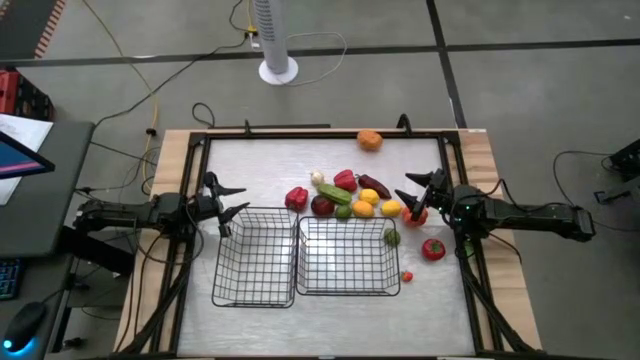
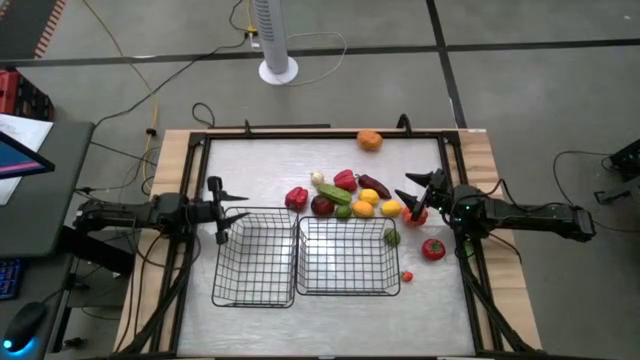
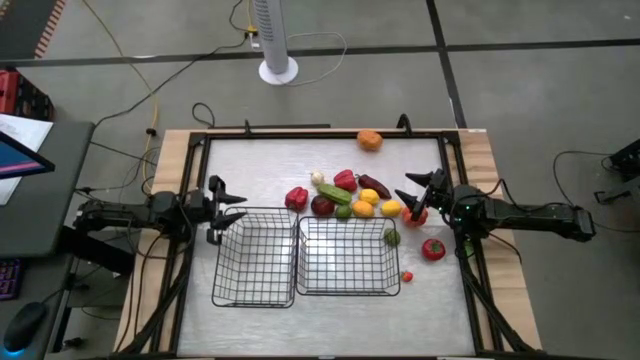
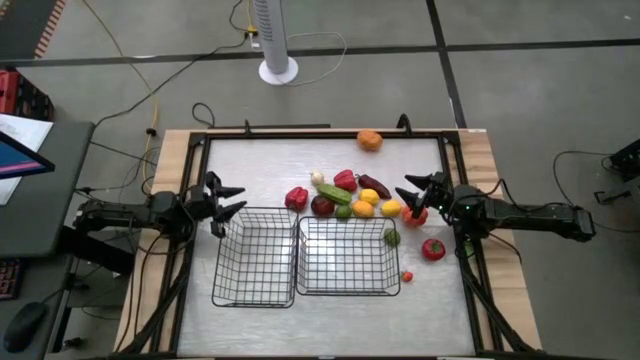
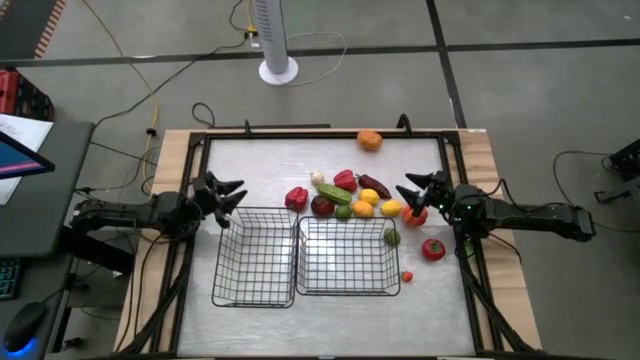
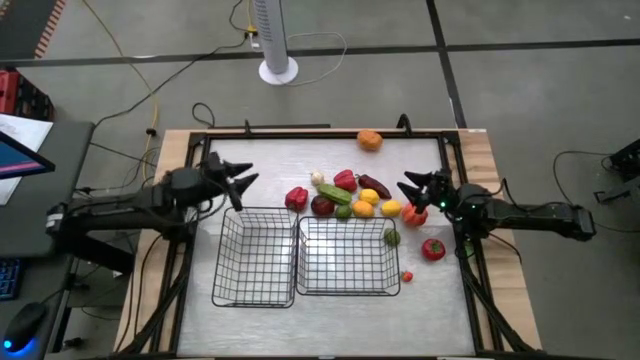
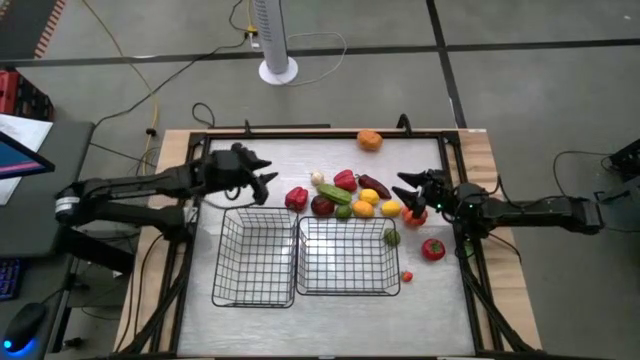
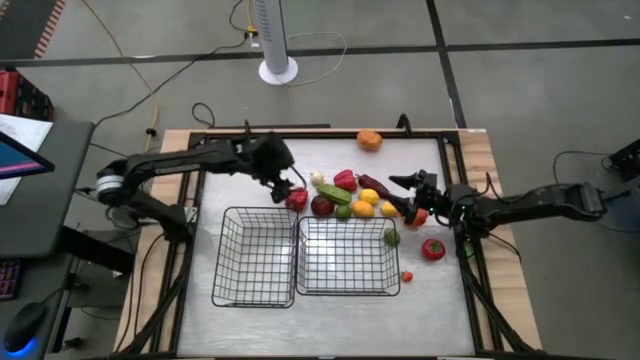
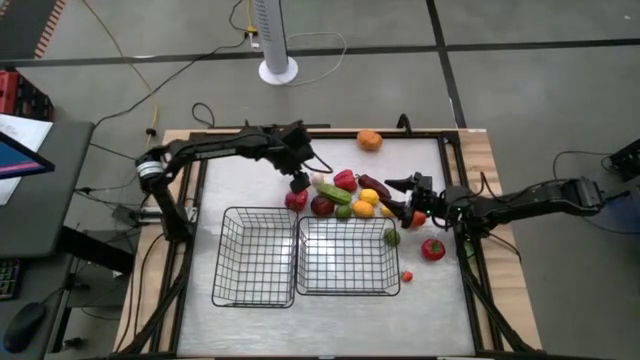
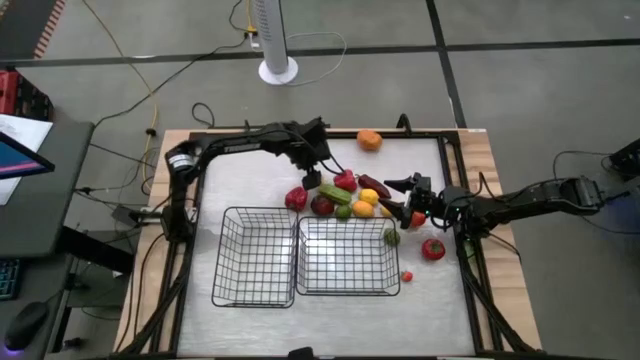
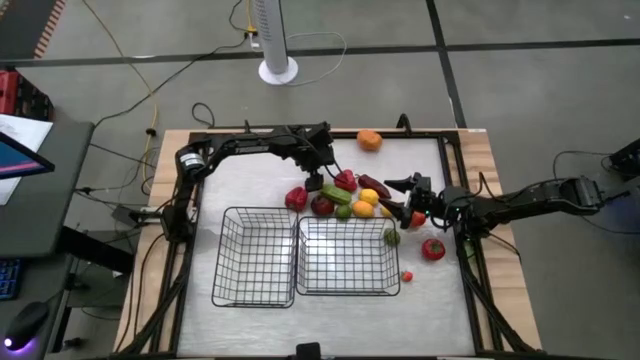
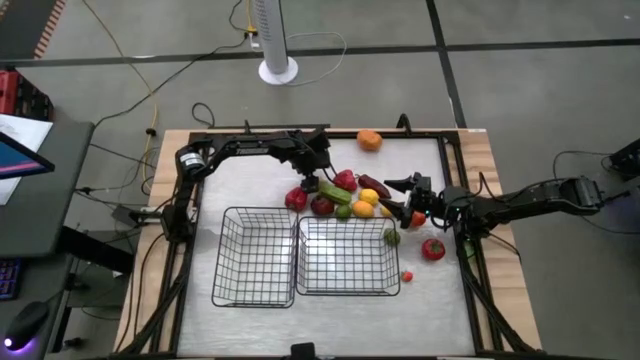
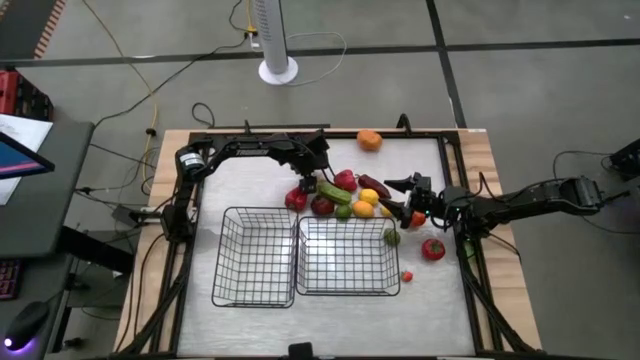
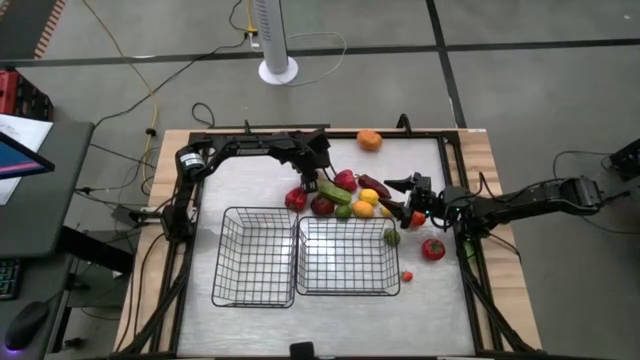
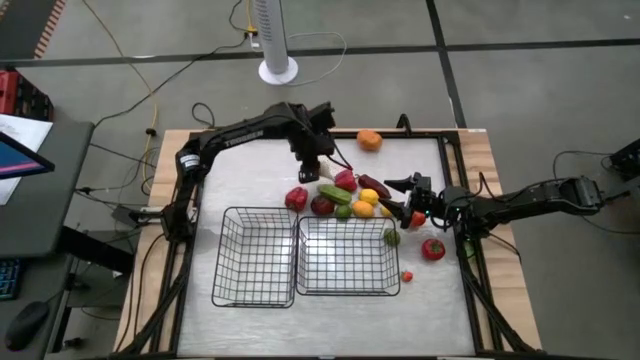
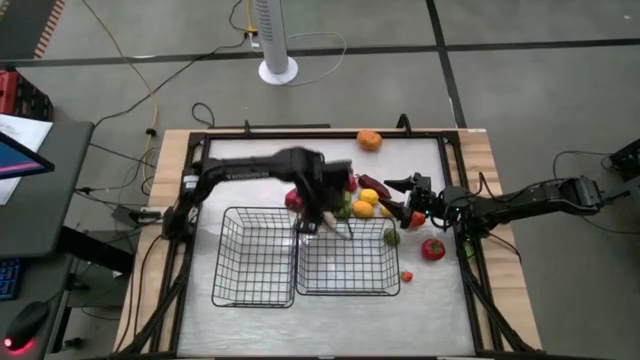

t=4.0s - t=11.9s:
Task: Sort produce into baskets
Put the garlic into the right wire basket

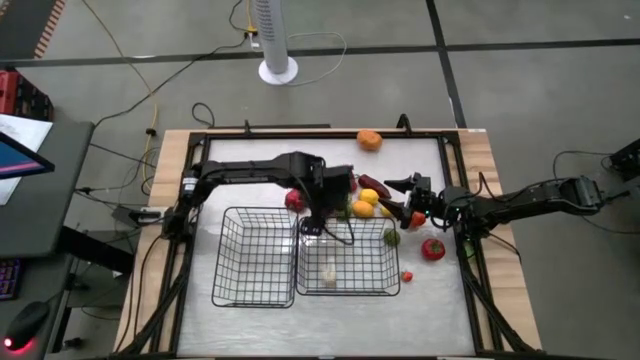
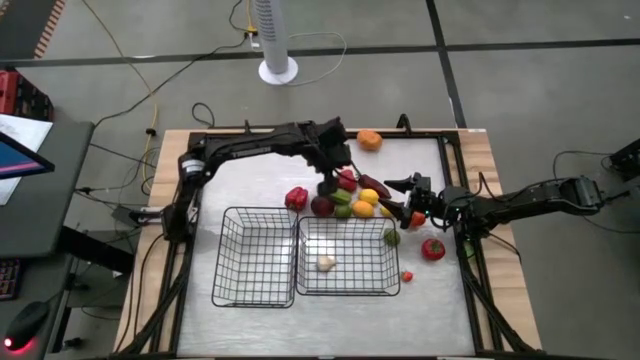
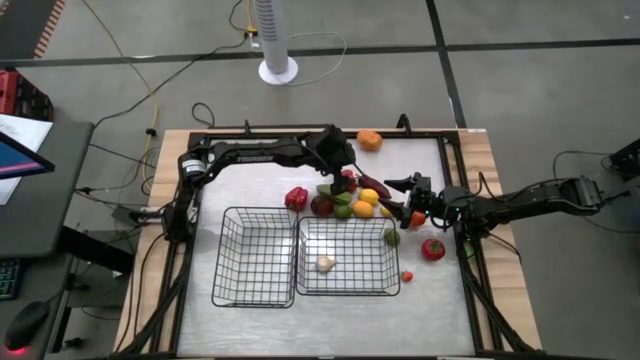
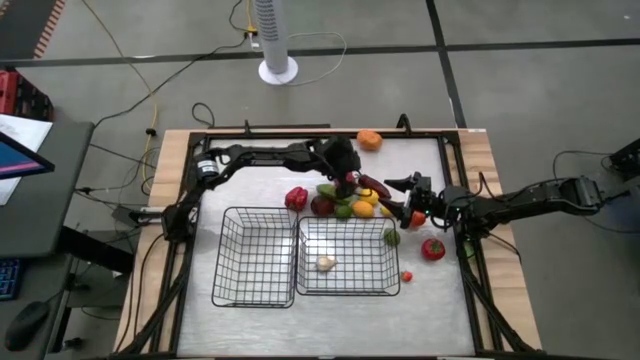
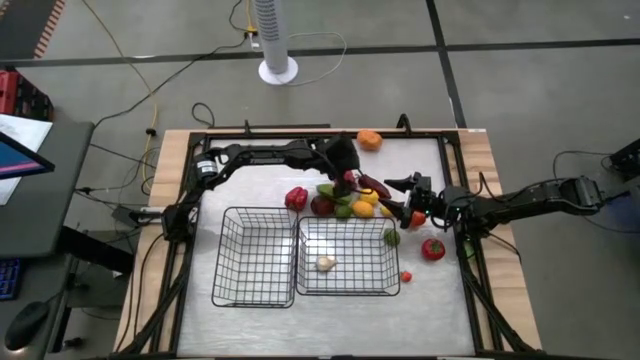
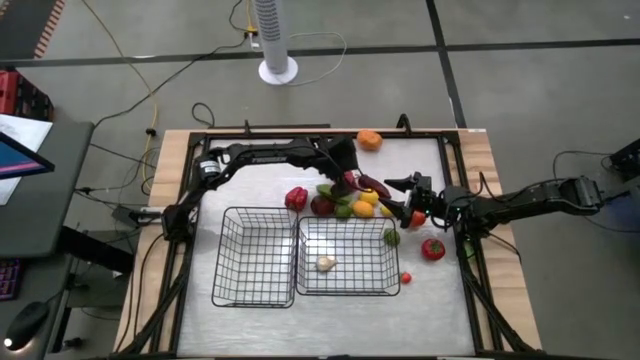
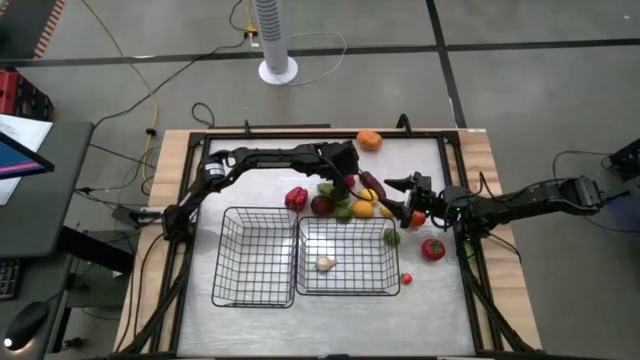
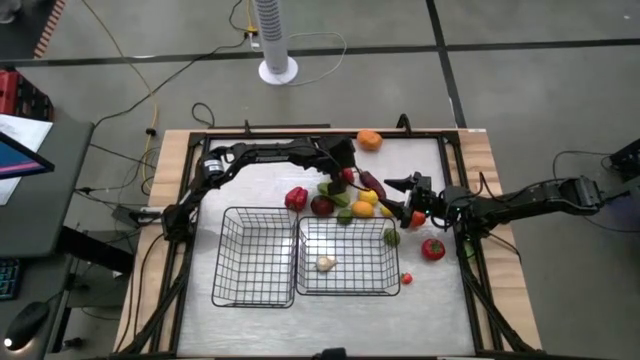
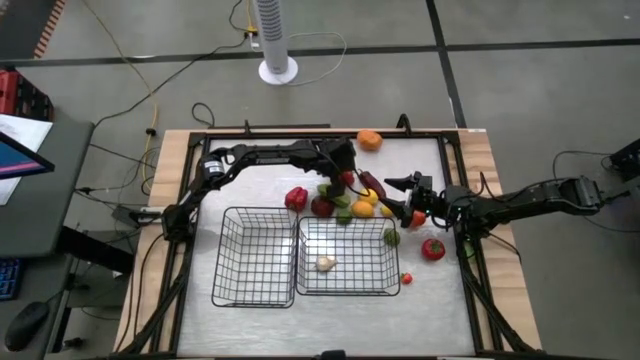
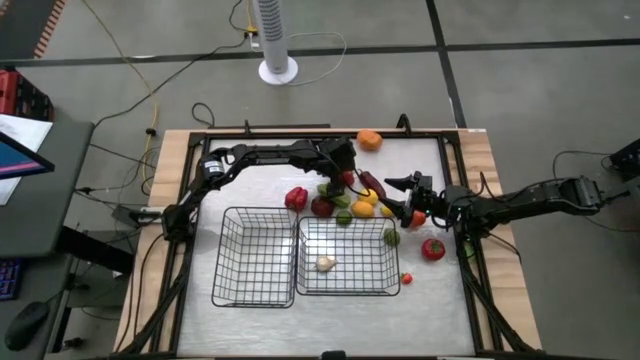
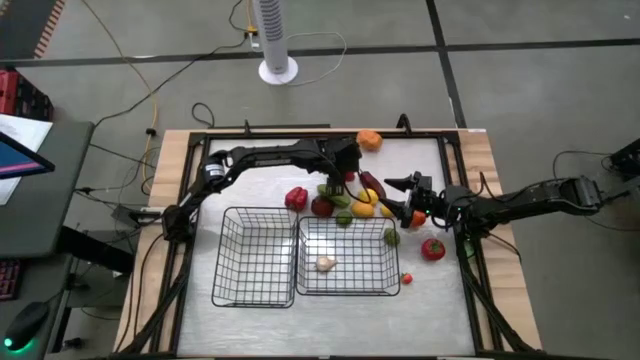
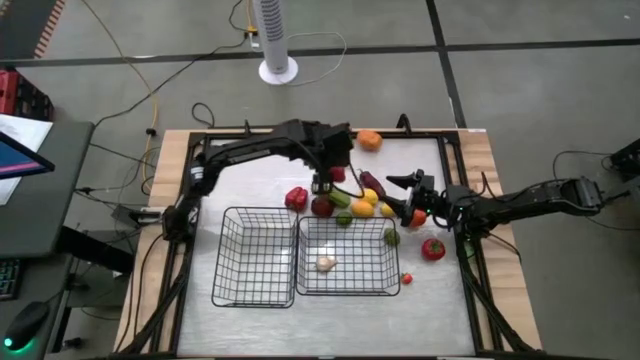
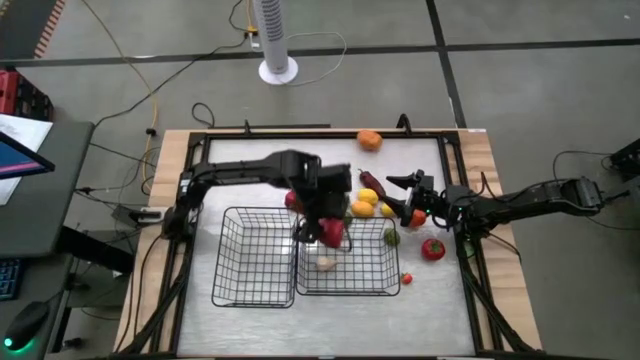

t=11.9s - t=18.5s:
Put the top red bell pepper into the right wire basket

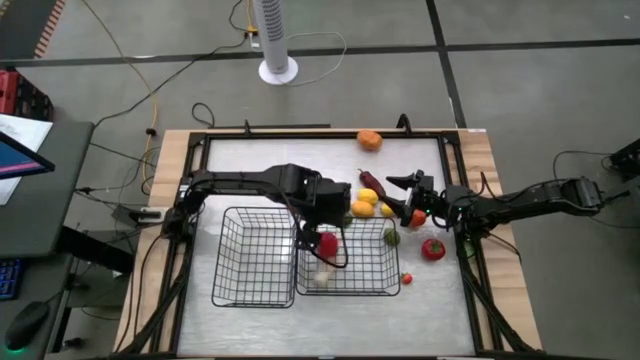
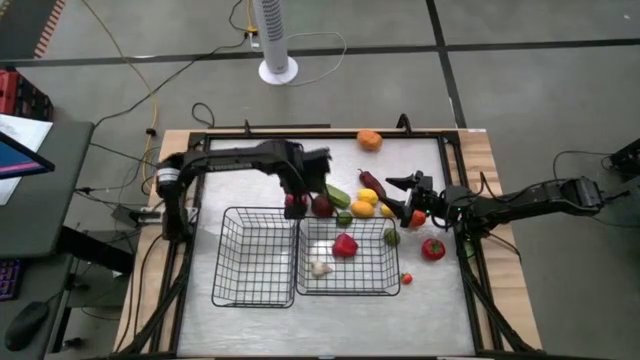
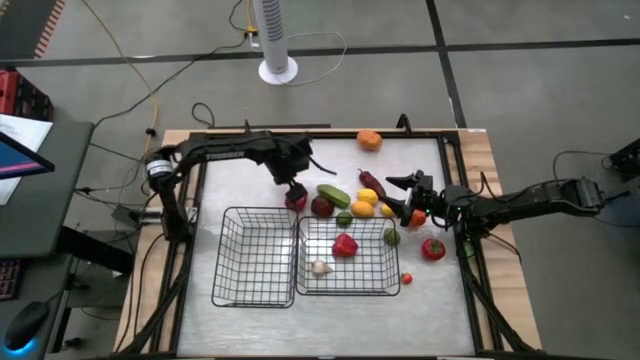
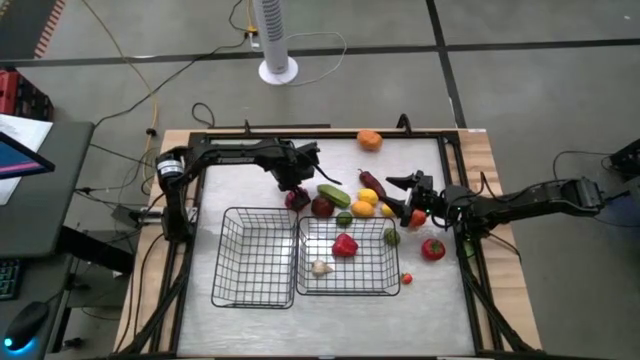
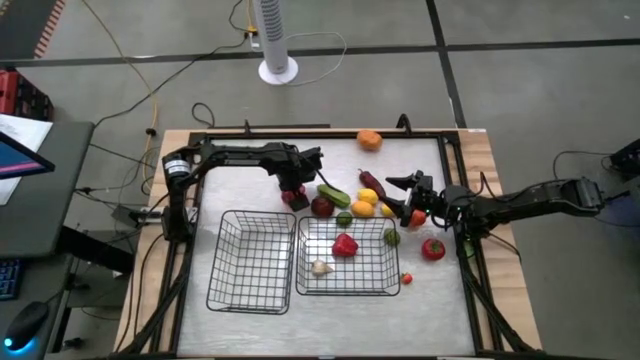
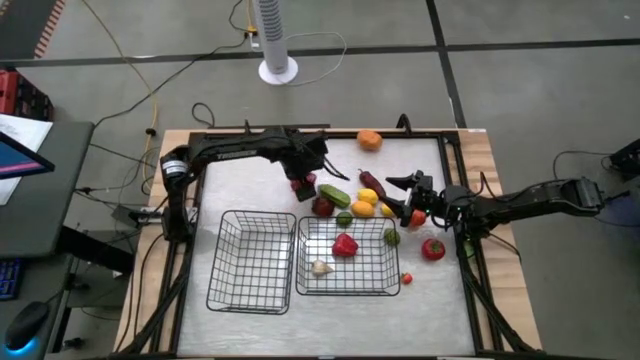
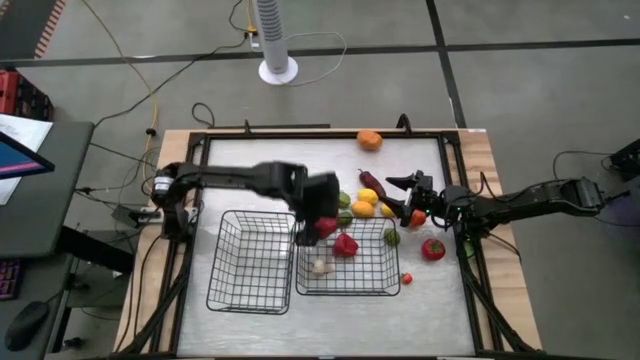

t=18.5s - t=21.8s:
Put the red bell pepper into the right wire basket

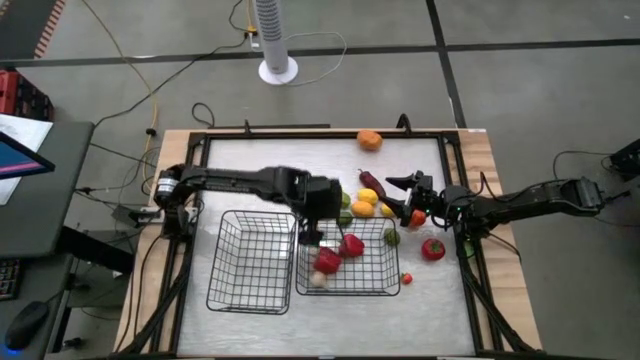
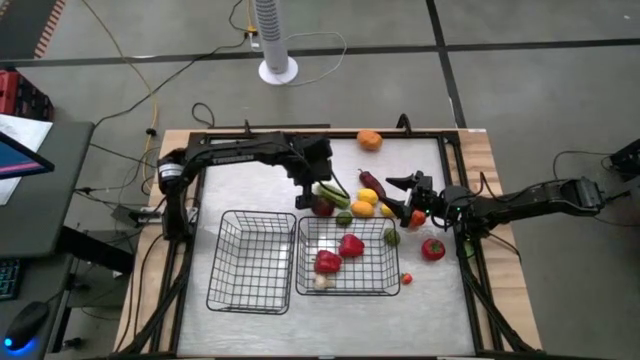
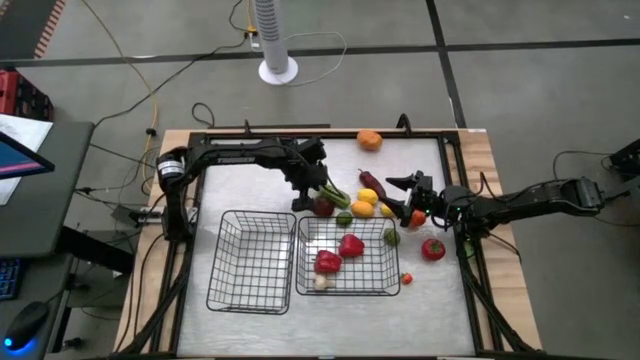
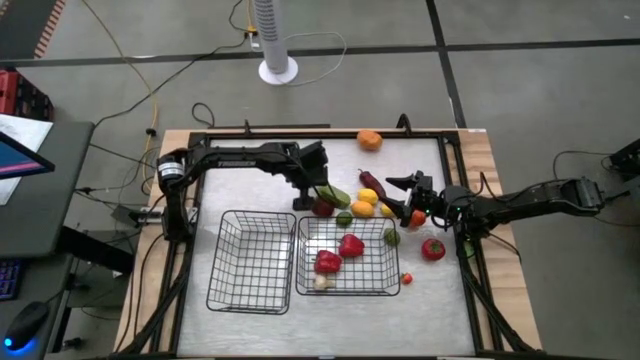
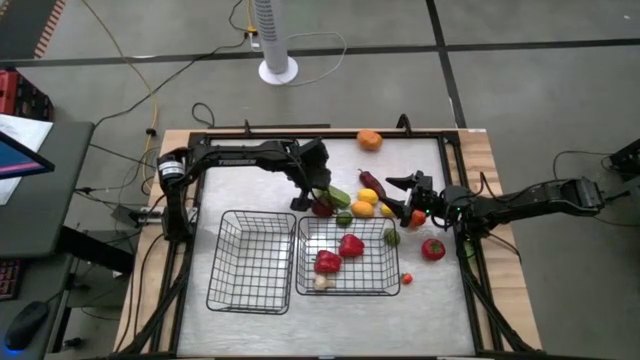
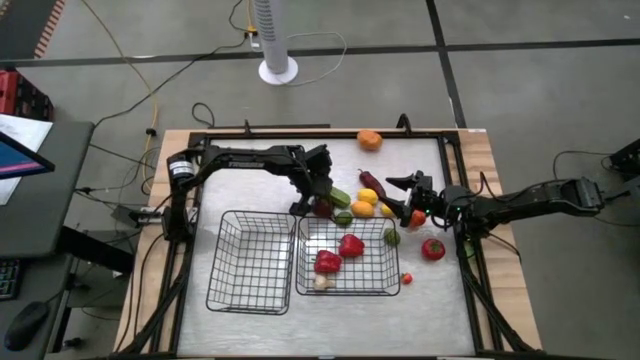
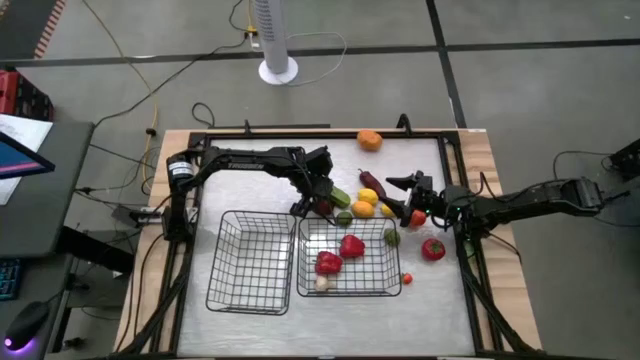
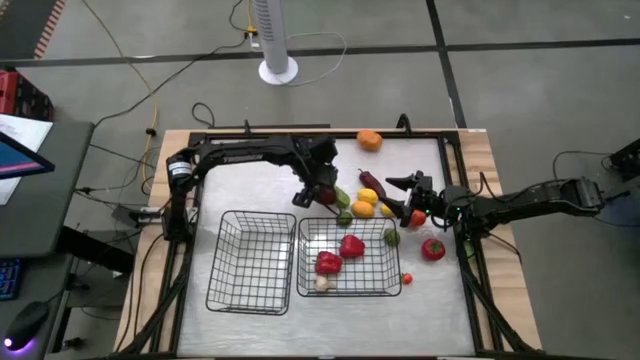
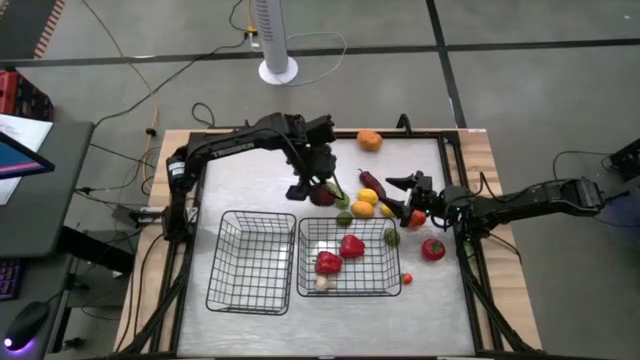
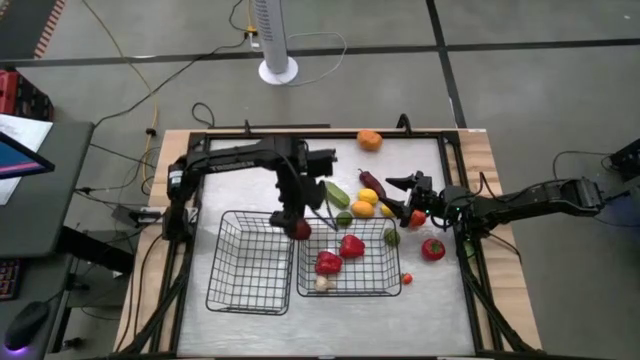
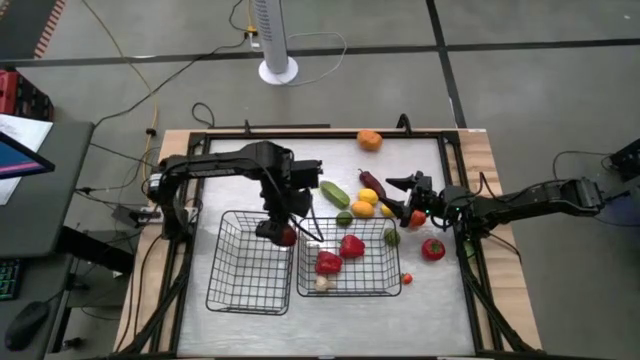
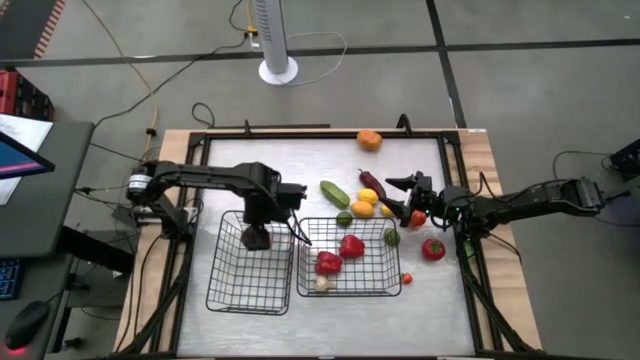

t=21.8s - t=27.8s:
Put the apple into the left wire basket
